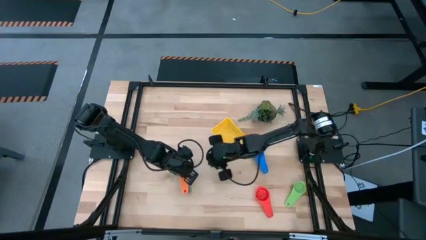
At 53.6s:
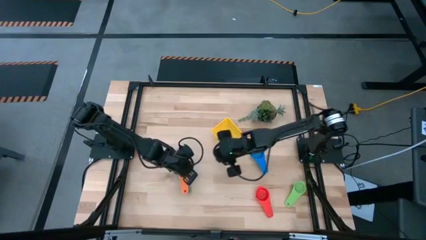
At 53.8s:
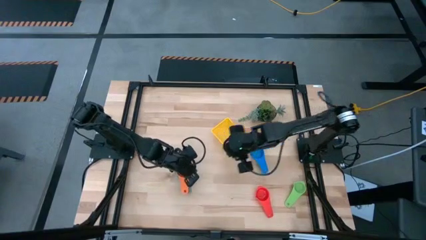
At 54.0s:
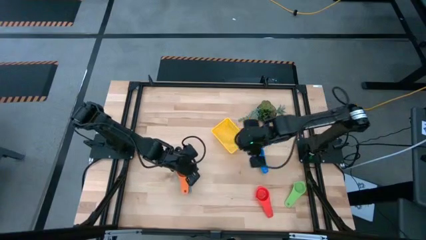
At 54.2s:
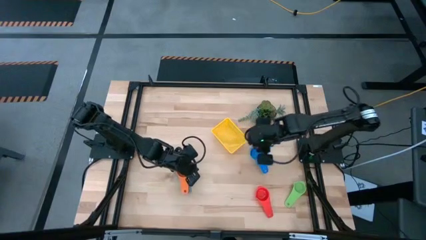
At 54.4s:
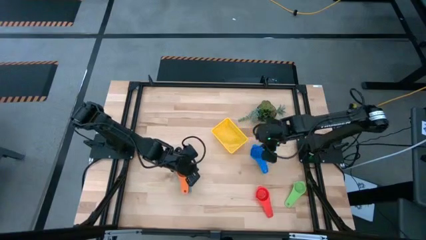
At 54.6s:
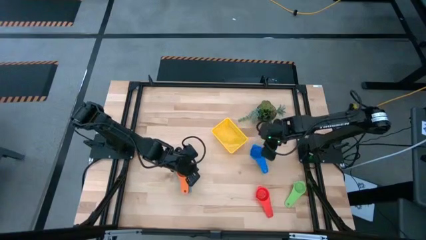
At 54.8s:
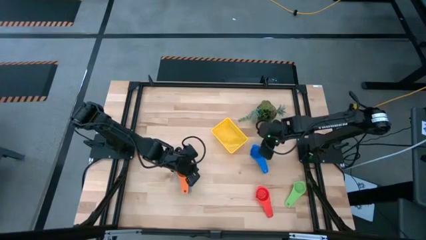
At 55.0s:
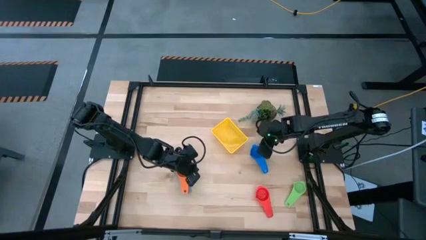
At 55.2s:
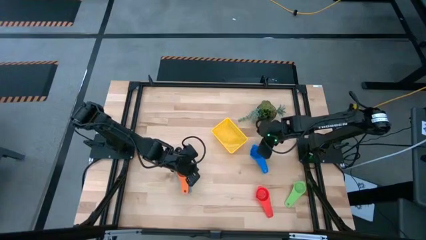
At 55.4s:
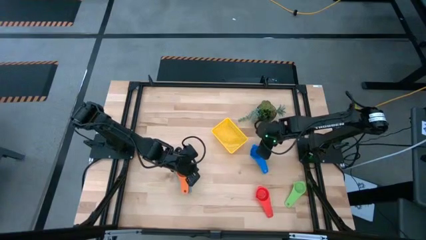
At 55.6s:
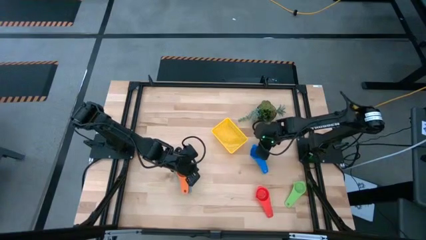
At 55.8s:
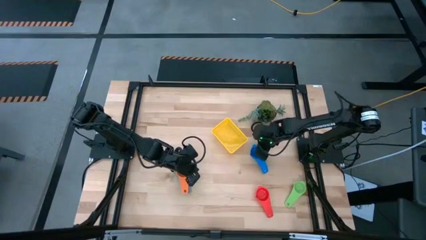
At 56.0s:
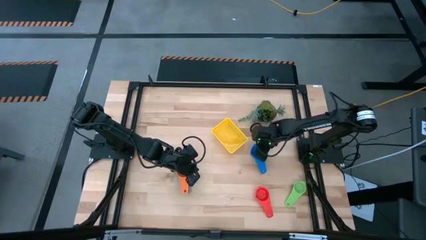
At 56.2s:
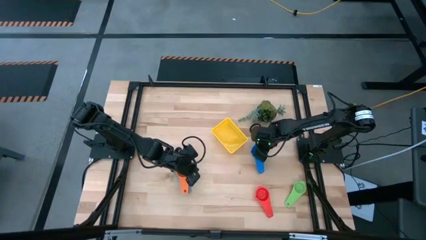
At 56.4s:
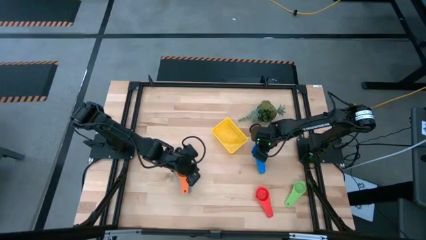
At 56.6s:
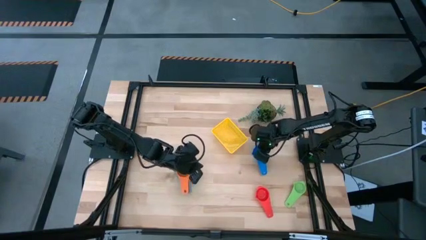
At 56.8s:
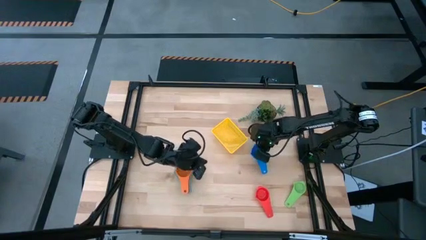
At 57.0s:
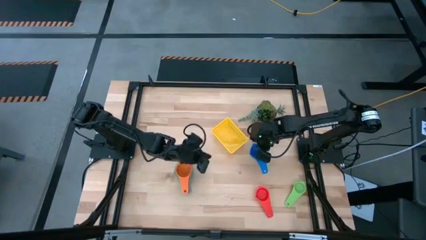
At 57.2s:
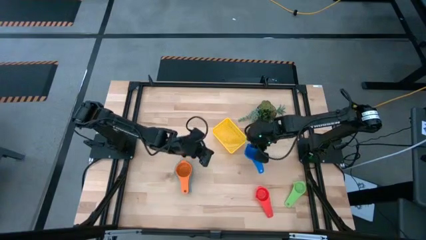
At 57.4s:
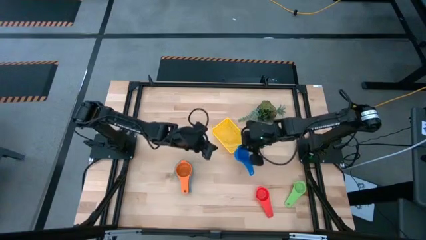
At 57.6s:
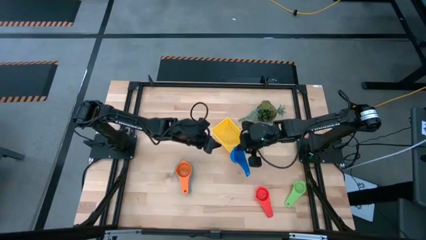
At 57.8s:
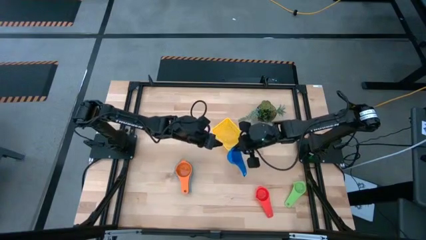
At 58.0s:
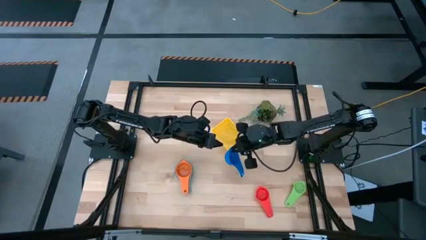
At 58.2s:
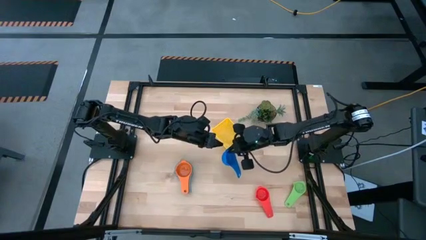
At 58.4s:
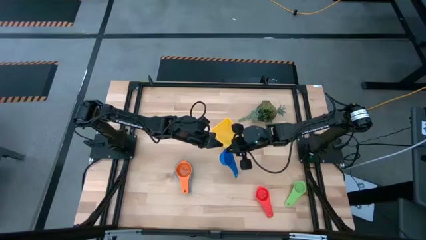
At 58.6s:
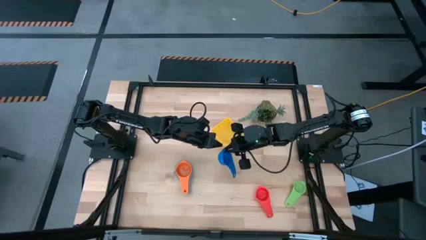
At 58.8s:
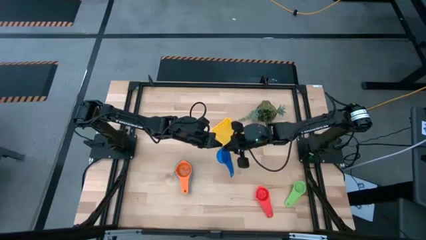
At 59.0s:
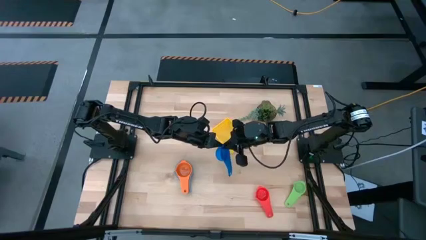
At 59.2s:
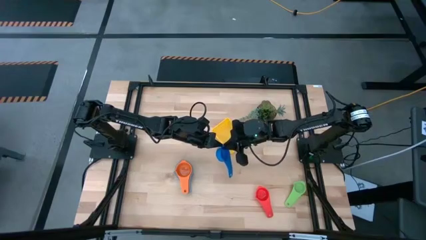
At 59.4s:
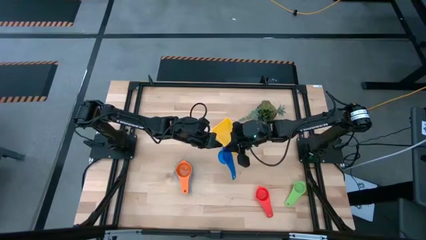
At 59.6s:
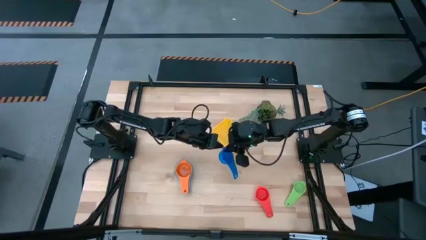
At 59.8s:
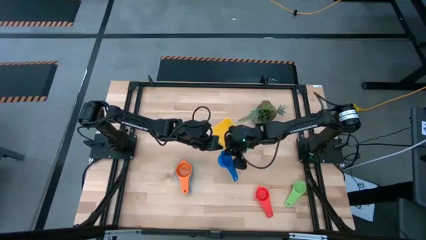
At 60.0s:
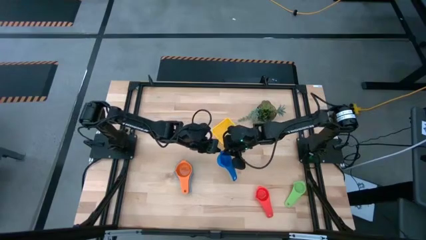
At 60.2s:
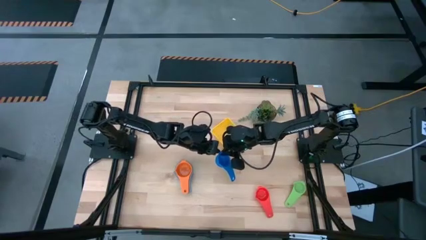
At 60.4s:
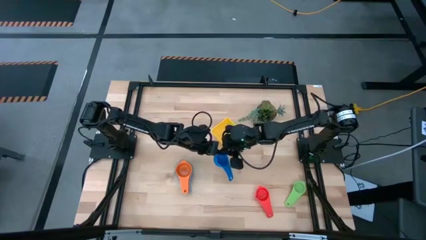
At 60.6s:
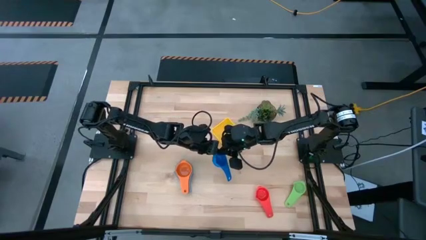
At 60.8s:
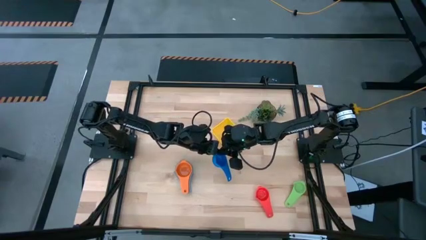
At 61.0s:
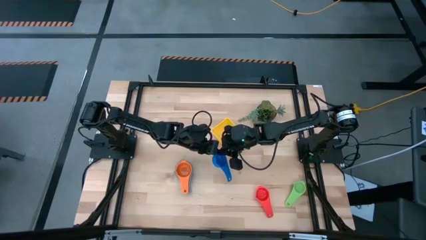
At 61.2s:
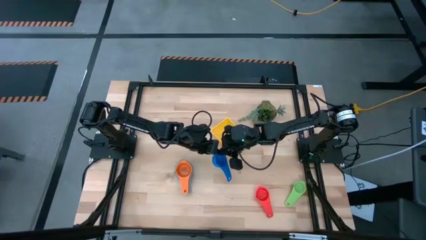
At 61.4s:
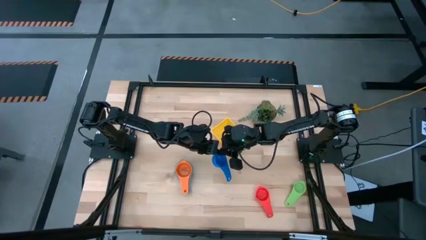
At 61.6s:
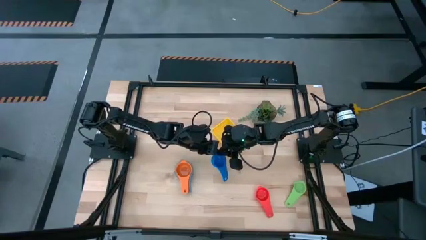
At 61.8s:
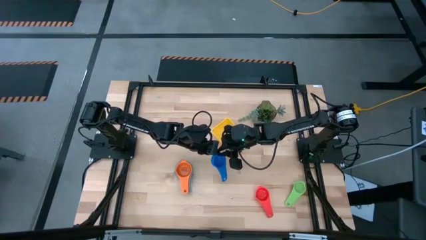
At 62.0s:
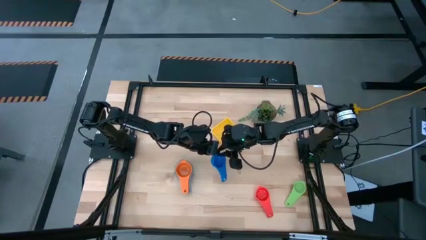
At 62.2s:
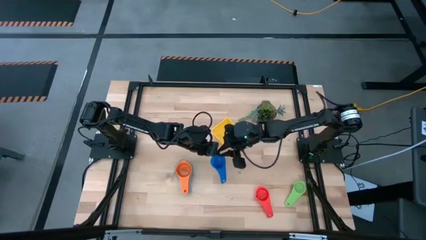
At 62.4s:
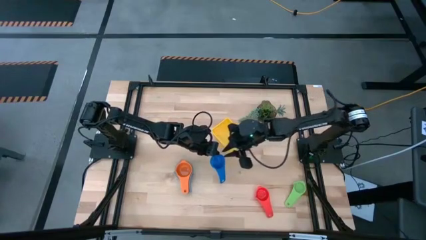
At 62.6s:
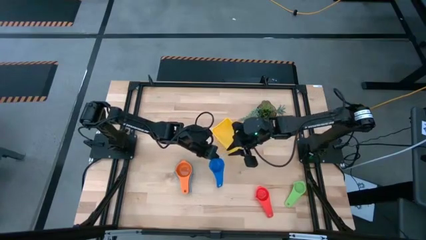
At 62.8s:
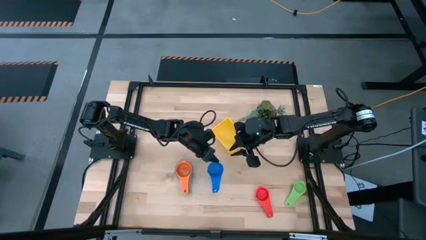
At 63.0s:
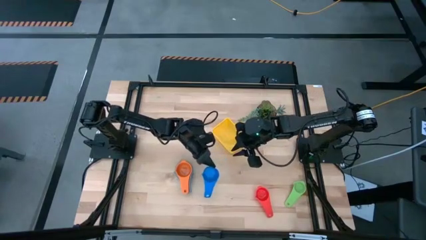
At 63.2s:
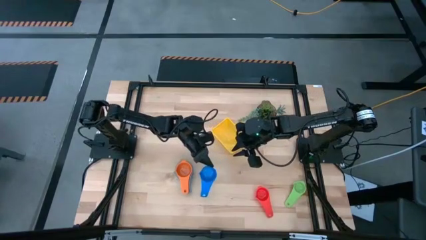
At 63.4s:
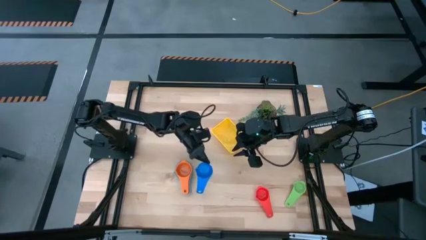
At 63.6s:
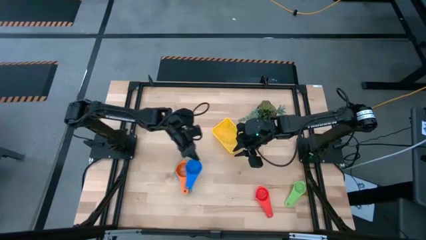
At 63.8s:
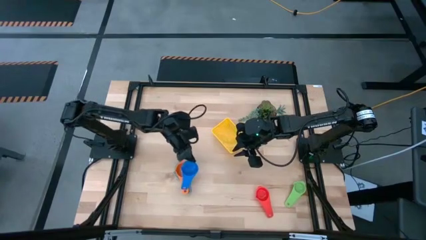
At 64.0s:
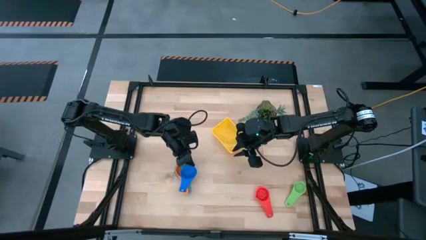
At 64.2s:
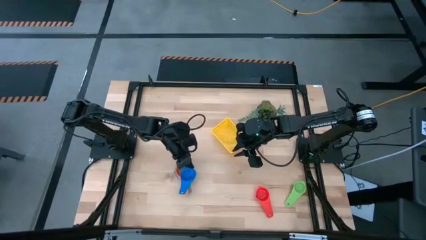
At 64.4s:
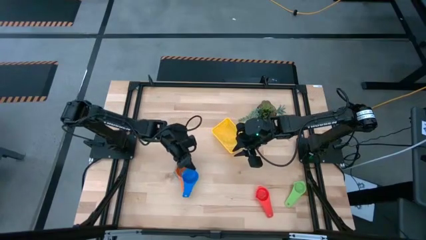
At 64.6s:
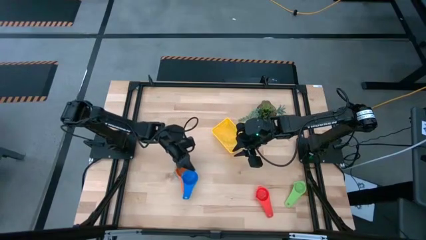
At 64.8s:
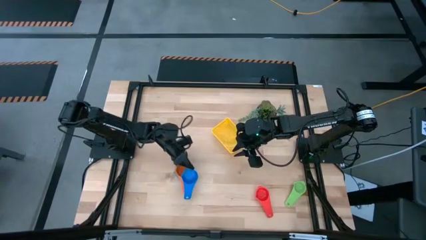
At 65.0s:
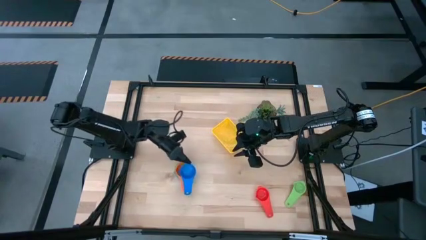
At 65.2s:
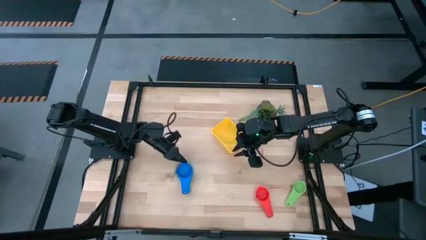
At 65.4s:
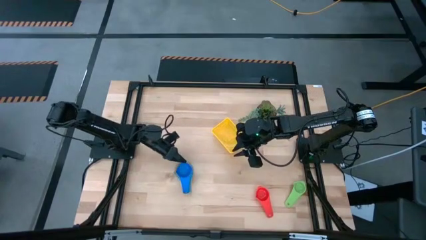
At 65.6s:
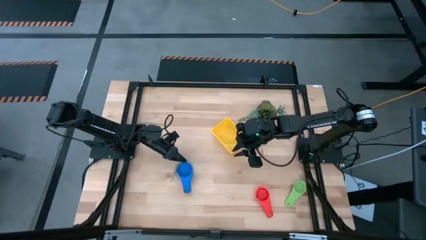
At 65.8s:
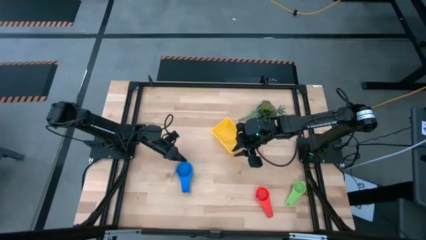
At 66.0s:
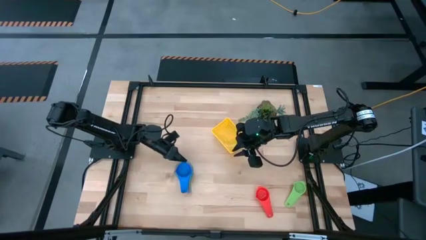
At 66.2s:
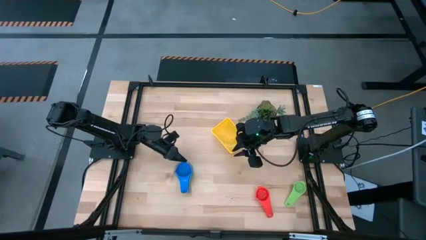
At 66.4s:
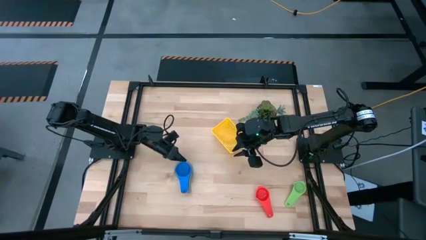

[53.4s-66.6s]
Task: Nest measuring cups in basket
Stack the blue measuring cup on top of the orange measuring cup

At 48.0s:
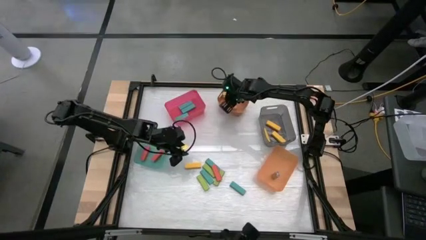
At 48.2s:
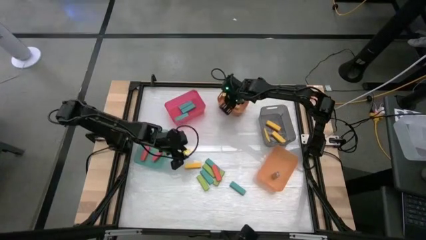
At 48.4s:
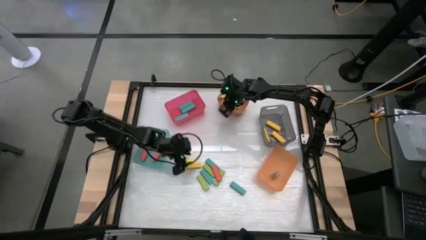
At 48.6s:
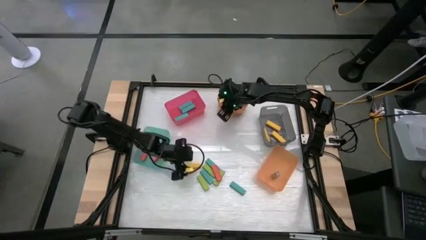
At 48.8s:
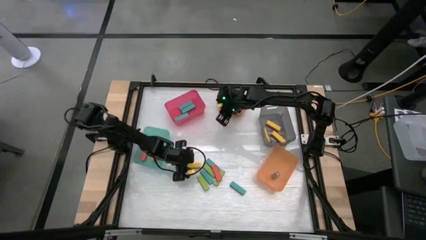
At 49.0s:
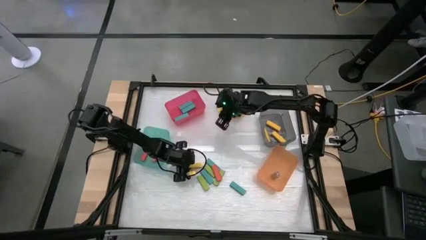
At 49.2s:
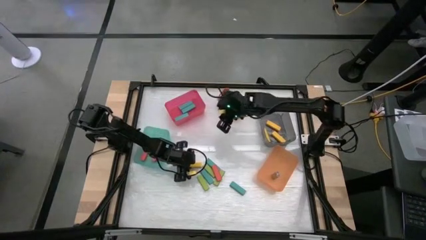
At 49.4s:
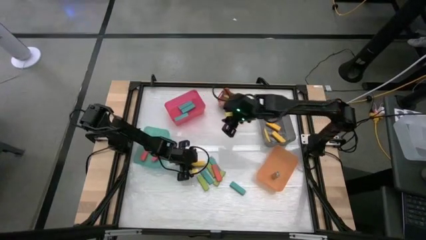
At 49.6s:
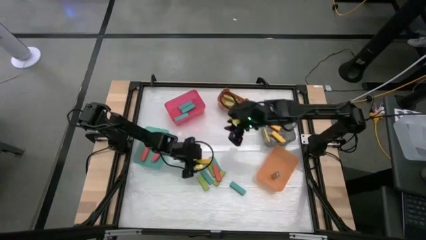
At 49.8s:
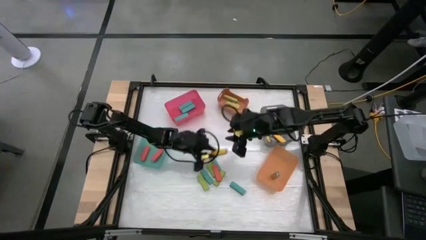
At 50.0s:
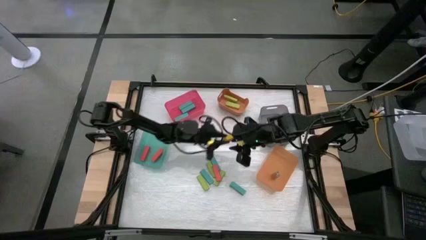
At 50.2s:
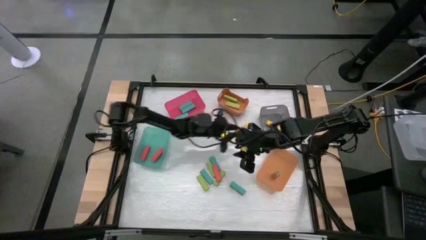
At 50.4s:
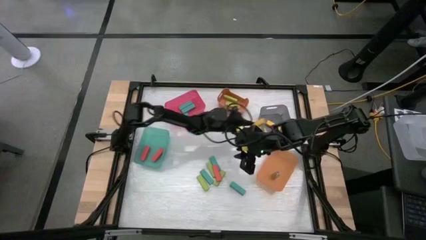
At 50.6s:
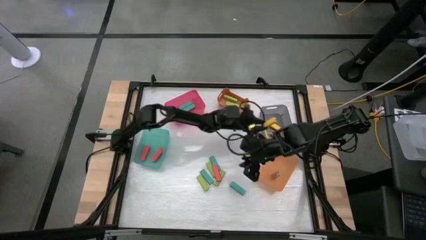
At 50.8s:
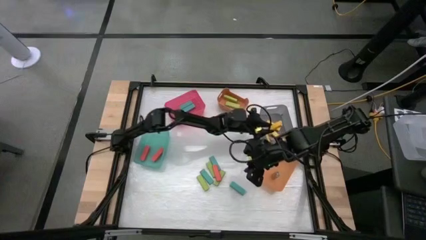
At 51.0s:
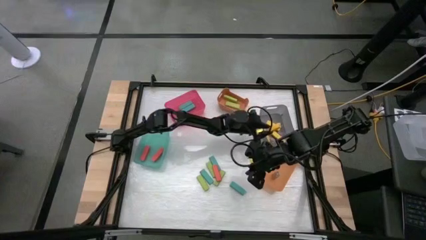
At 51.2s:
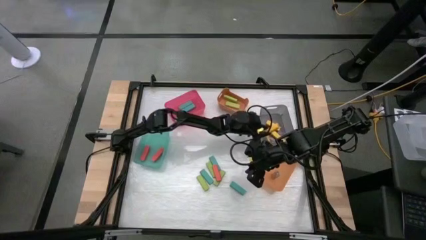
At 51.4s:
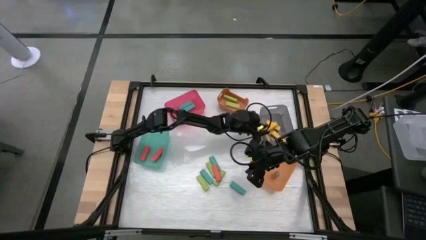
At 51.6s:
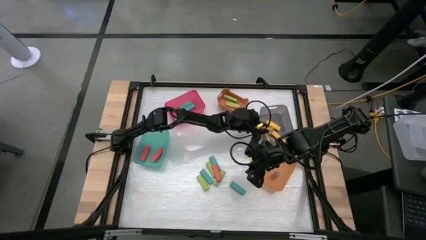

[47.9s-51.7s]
Task: Sort blocks
Put the yellow block into the gray bin
